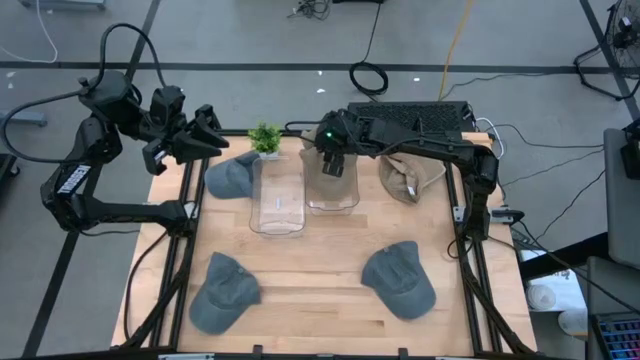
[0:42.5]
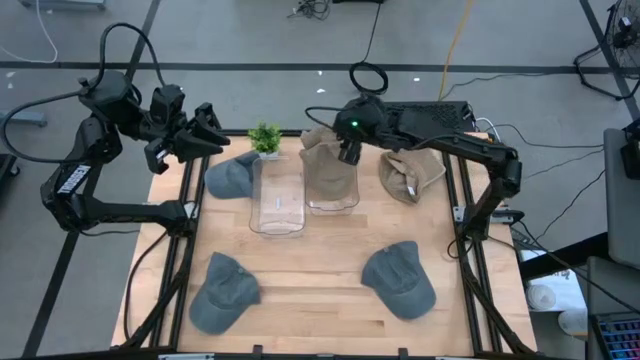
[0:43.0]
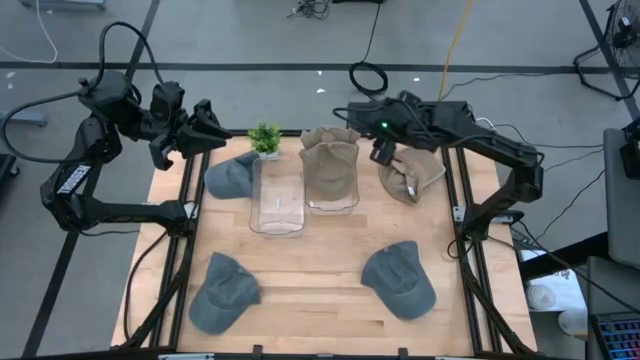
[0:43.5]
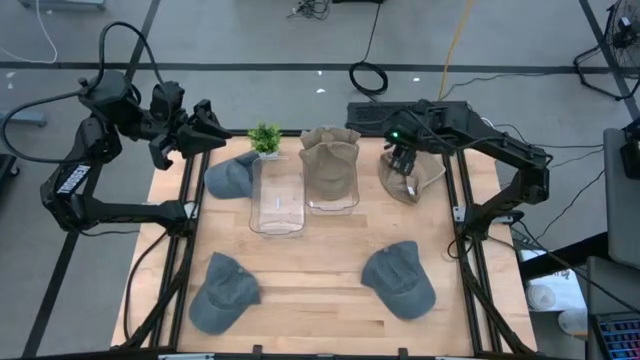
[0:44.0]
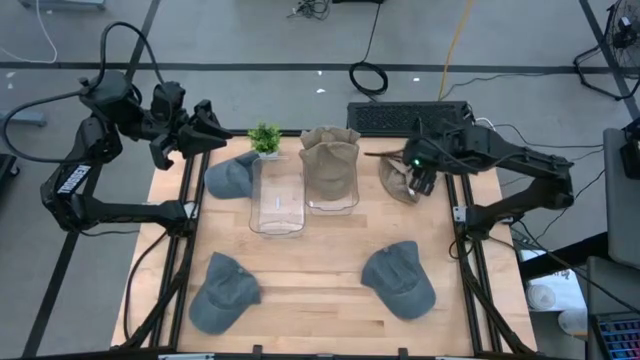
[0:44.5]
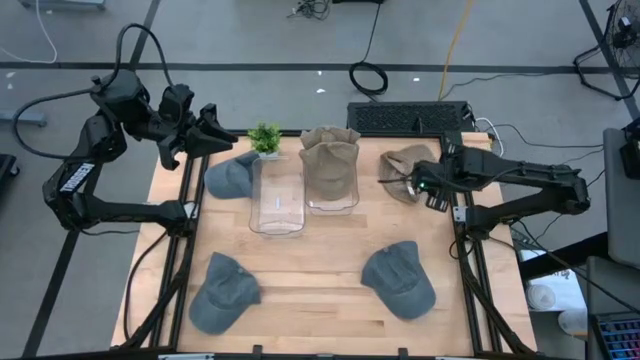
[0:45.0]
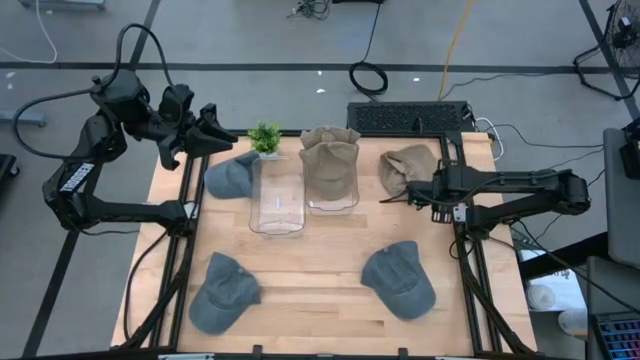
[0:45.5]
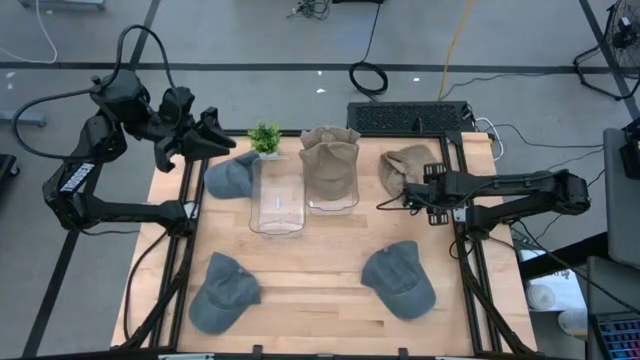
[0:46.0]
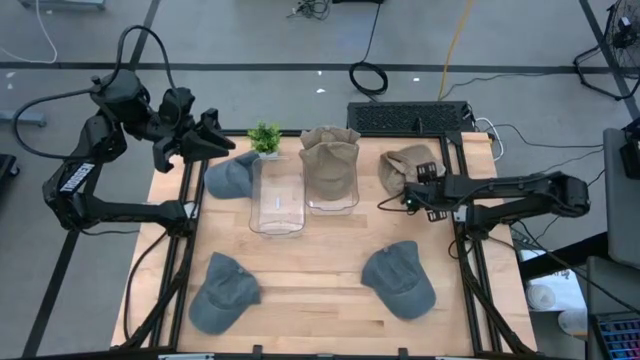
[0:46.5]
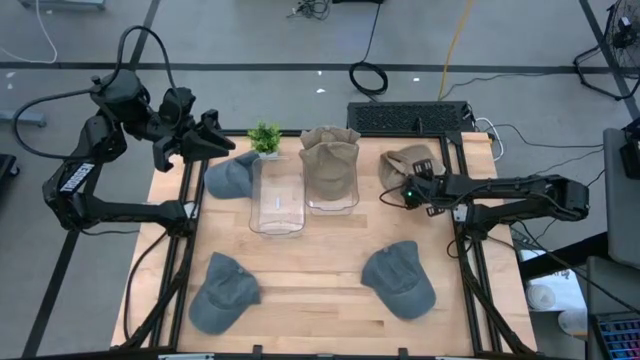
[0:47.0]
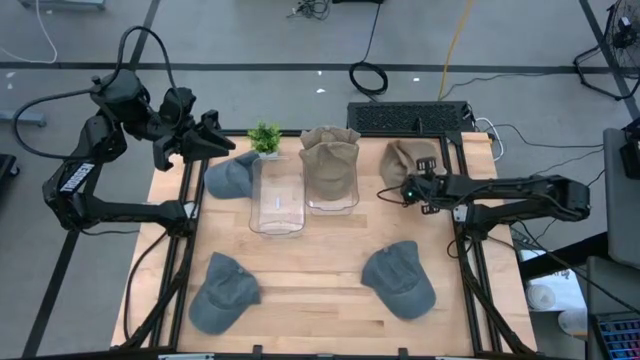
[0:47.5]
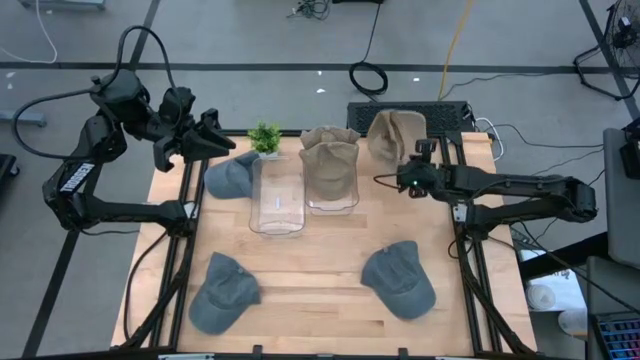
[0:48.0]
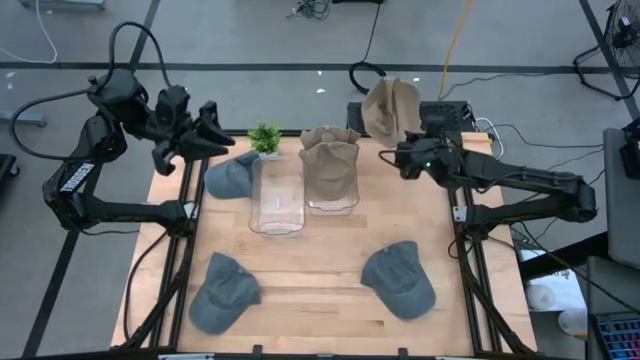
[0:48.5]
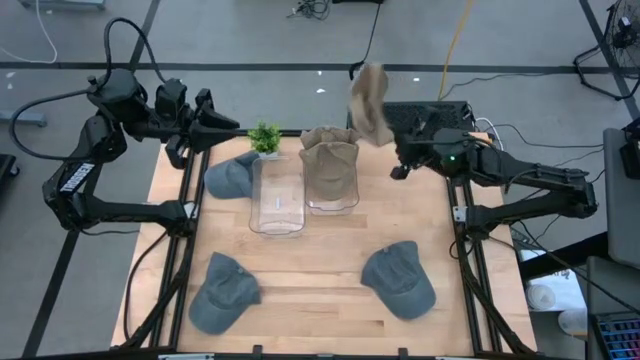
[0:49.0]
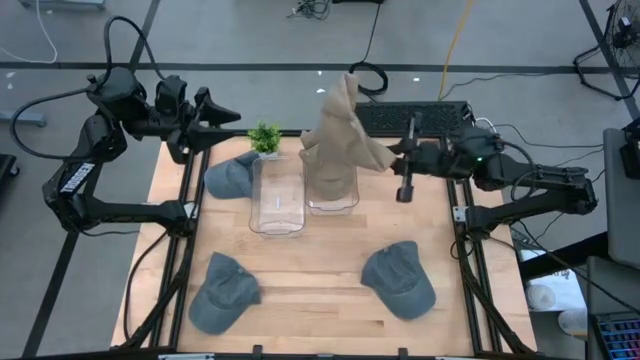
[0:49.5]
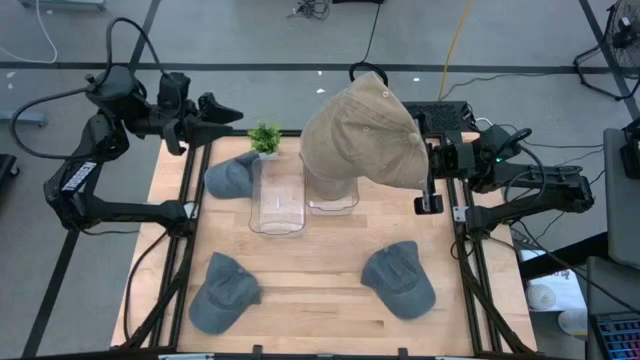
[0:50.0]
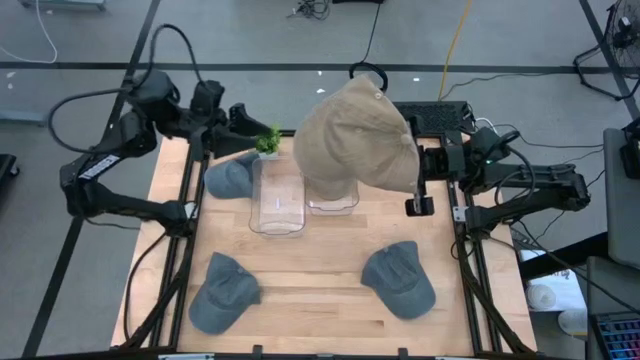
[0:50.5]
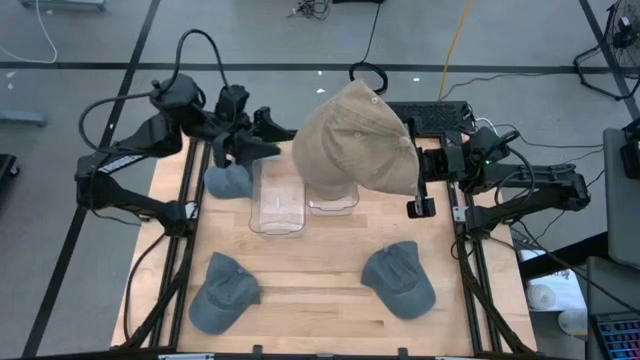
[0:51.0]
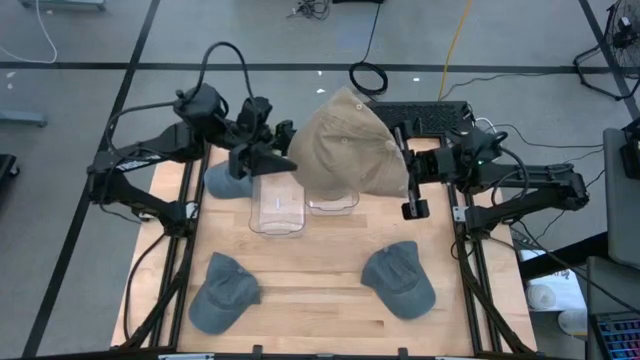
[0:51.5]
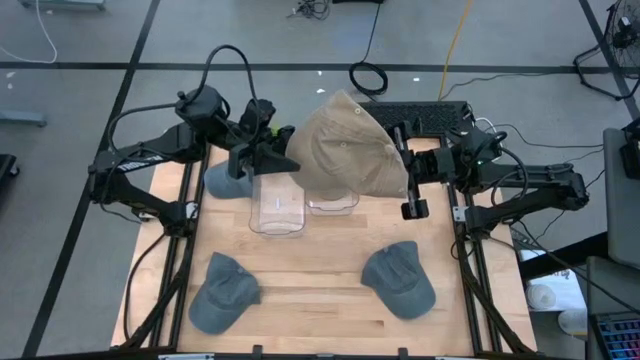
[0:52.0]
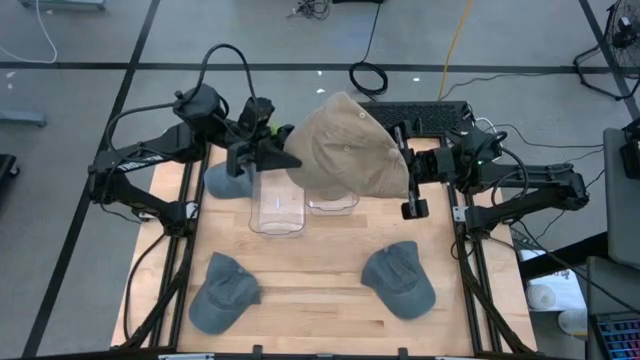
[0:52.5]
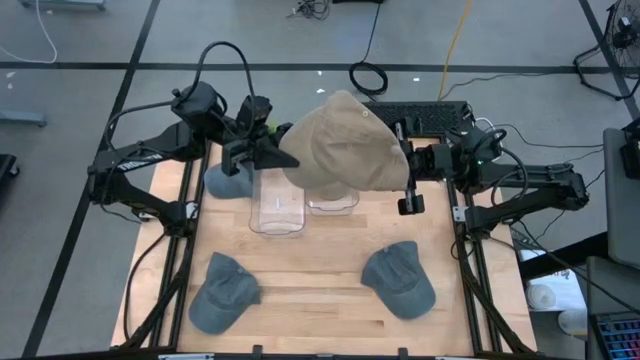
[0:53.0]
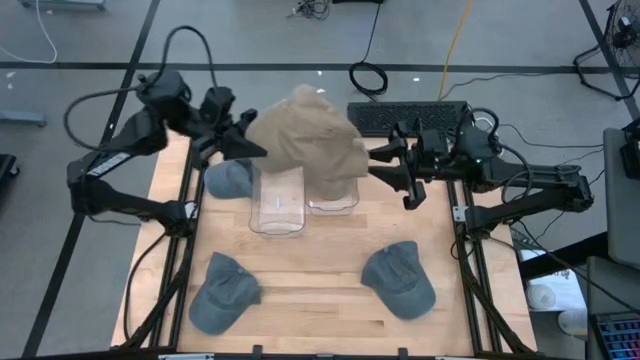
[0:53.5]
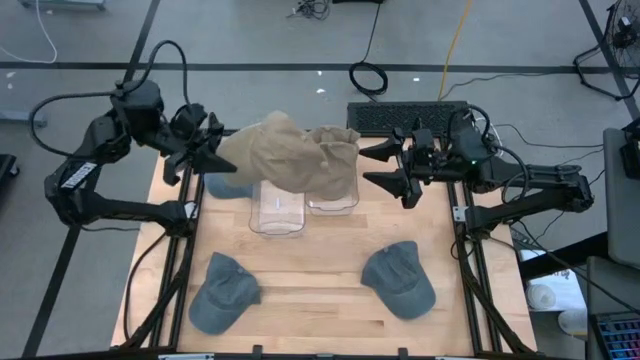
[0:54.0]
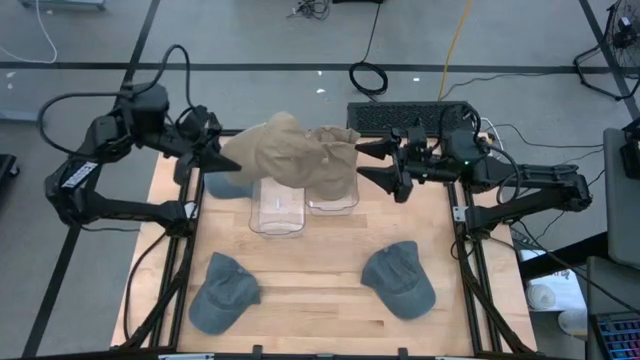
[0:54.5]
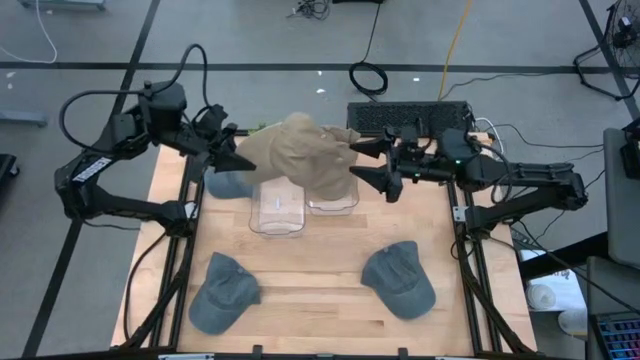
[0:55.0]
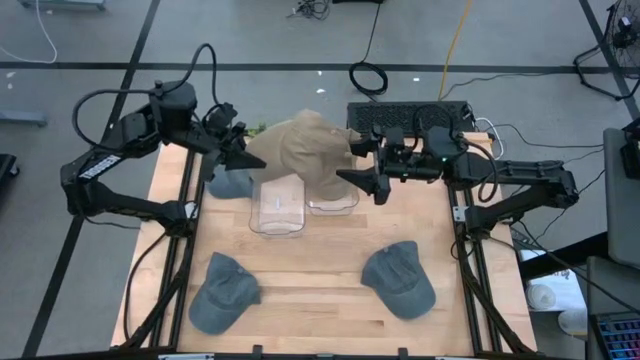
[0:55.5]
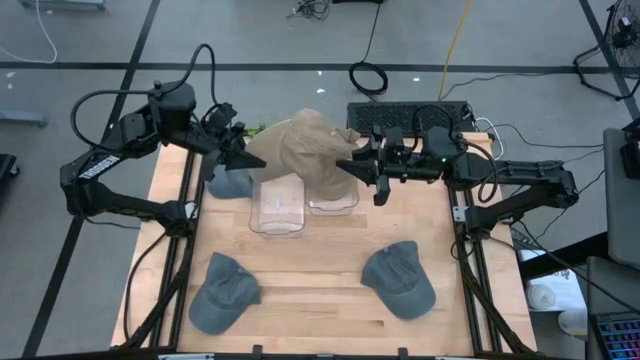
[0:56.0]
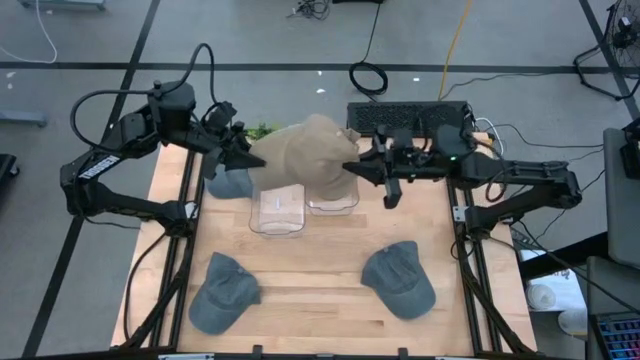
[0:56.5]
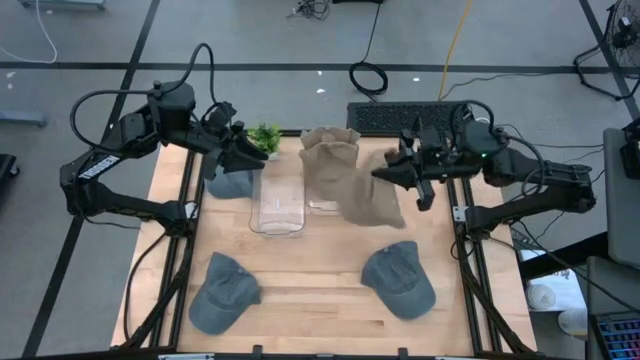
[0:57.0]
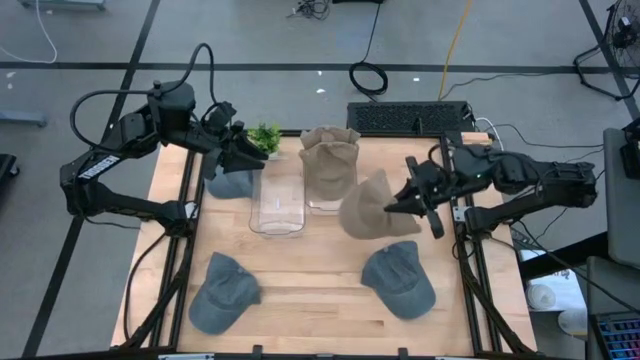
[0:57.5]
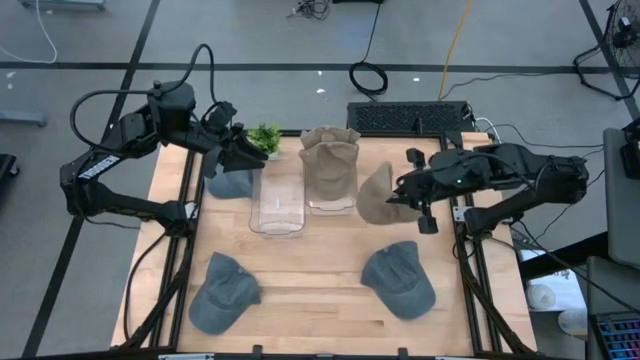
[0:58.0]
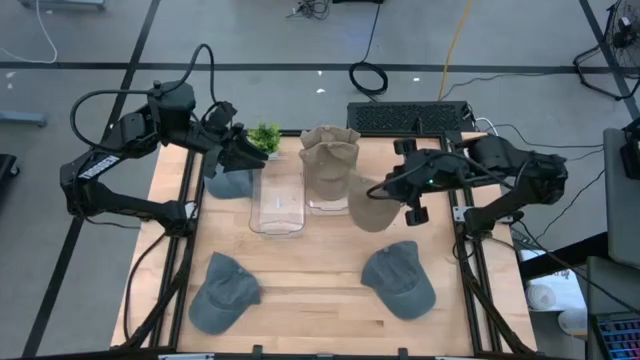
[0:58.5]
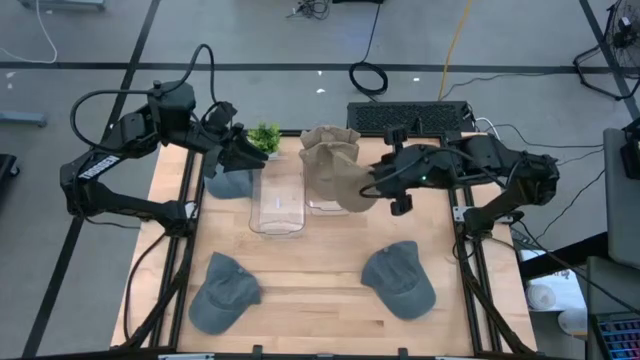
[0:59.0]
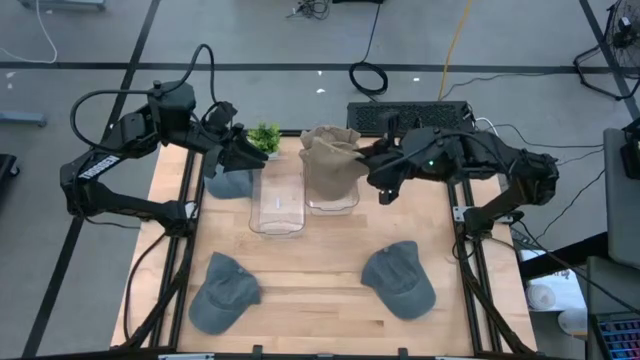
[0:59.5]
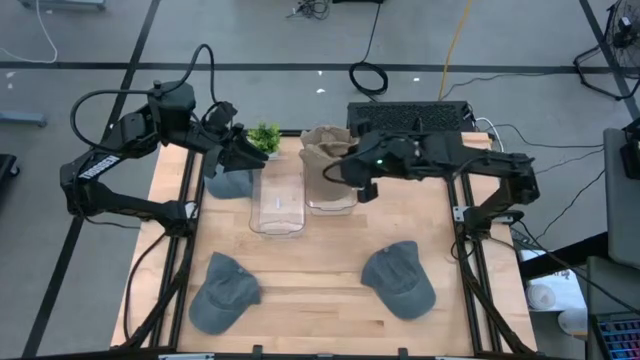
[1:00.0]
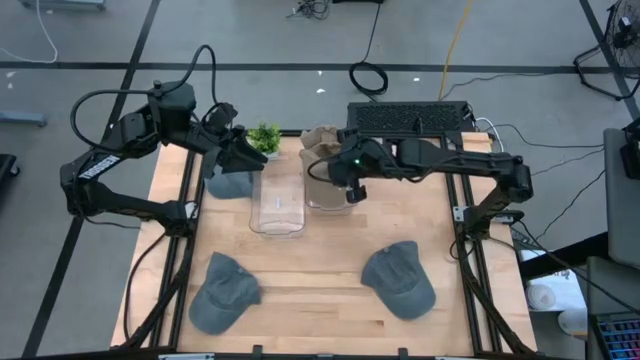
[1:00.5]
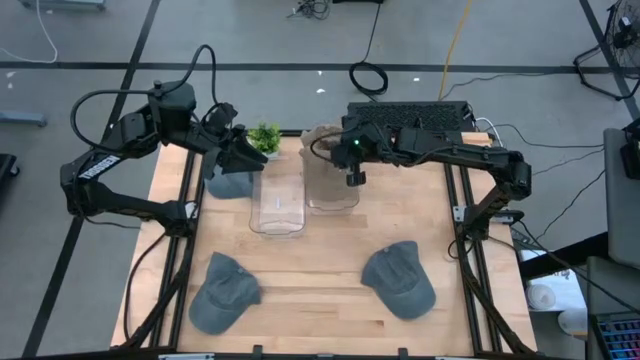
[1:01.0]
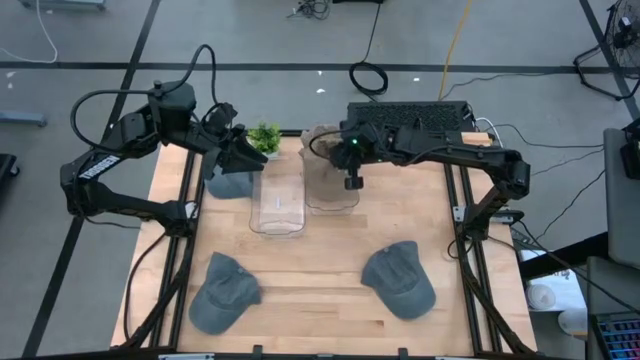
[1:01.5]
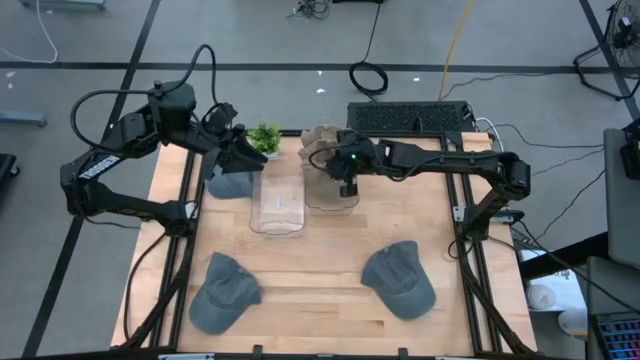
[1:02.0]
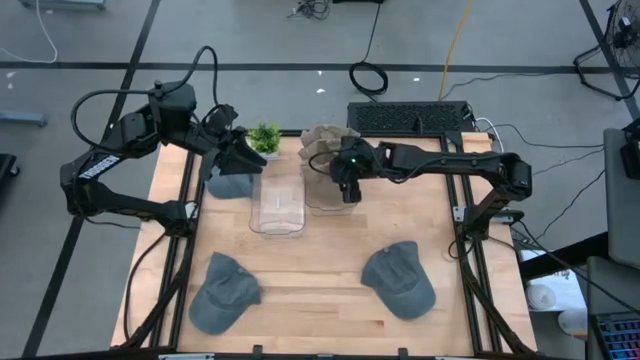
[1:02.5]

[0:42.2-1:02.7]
Task: Pick & Place hat
Put the brown cap into the right transparent bin
